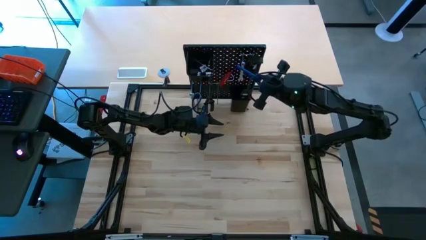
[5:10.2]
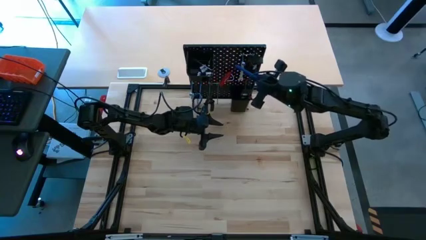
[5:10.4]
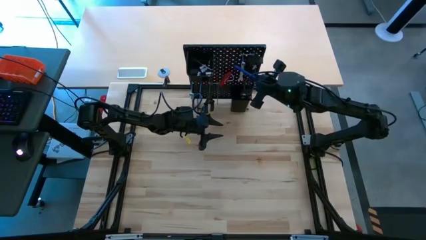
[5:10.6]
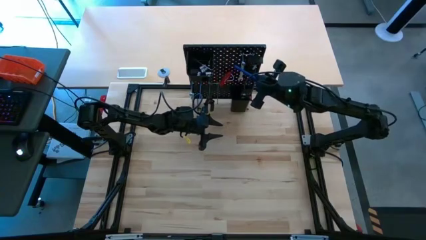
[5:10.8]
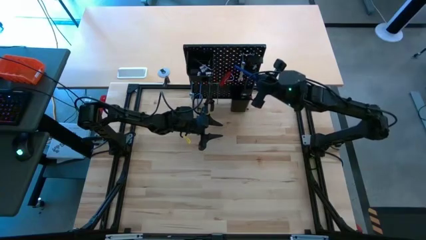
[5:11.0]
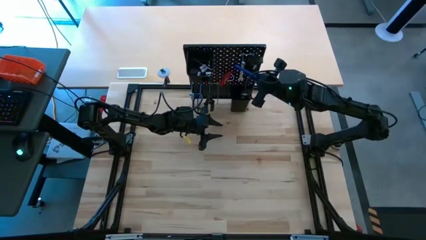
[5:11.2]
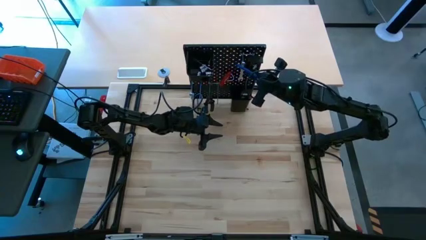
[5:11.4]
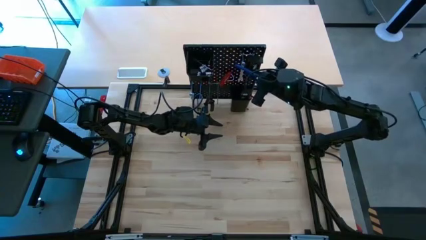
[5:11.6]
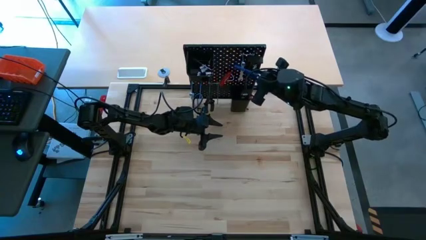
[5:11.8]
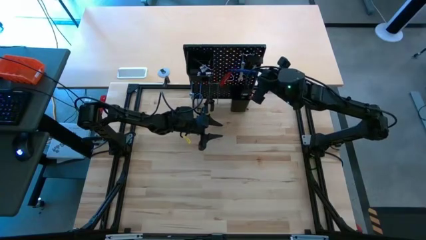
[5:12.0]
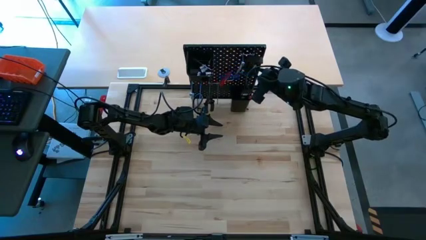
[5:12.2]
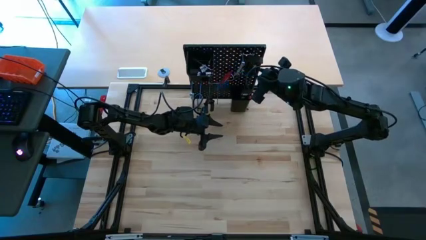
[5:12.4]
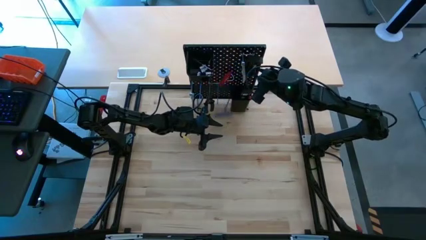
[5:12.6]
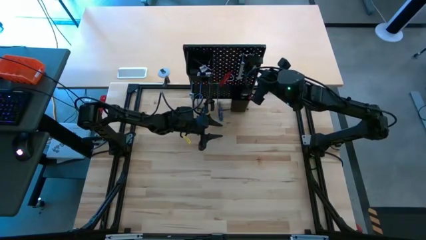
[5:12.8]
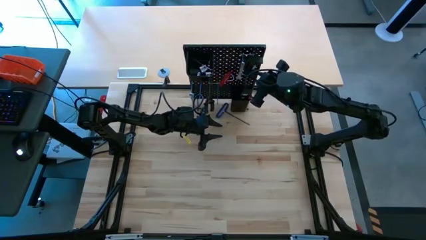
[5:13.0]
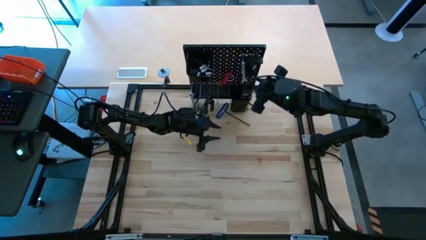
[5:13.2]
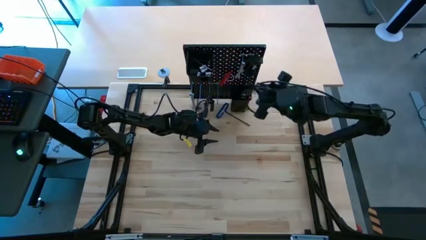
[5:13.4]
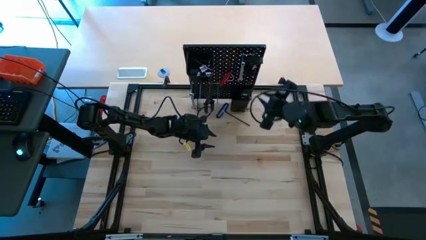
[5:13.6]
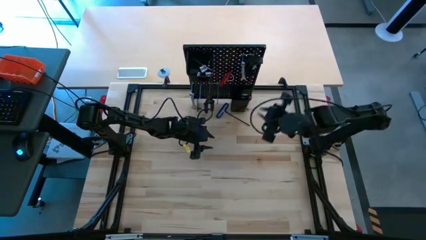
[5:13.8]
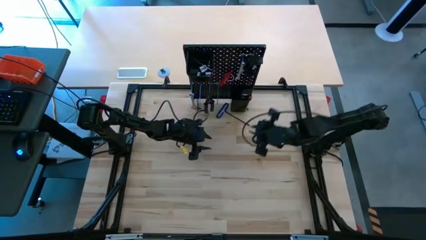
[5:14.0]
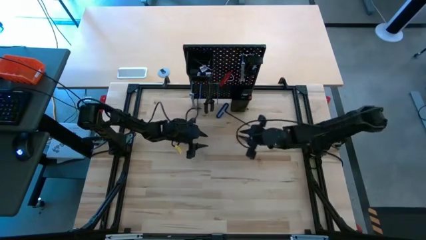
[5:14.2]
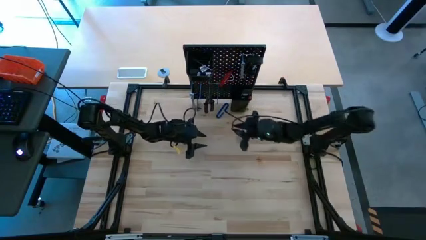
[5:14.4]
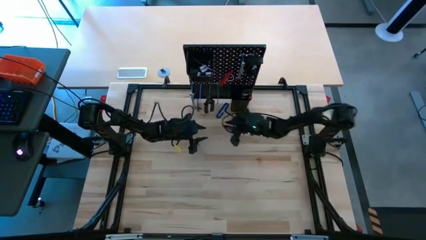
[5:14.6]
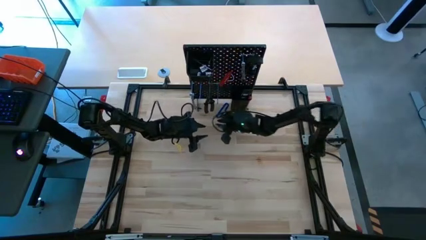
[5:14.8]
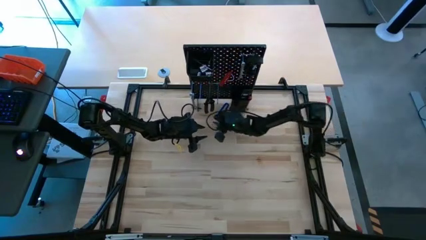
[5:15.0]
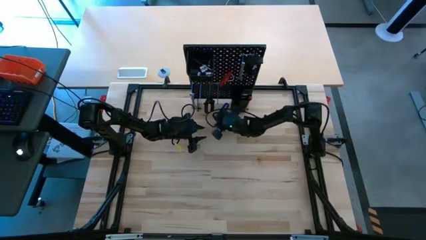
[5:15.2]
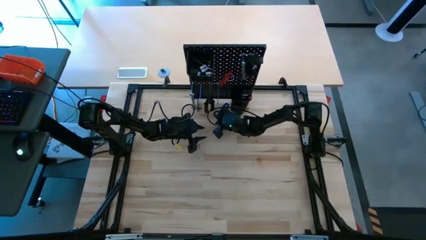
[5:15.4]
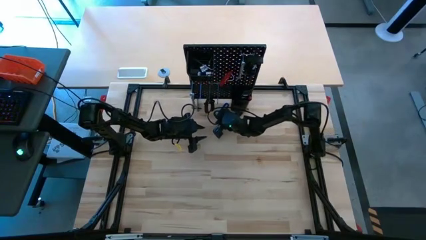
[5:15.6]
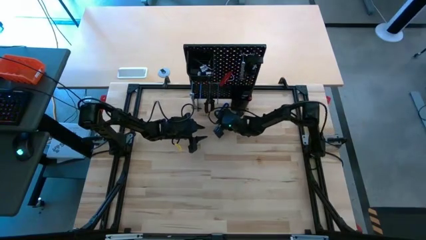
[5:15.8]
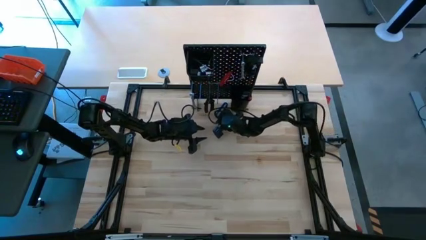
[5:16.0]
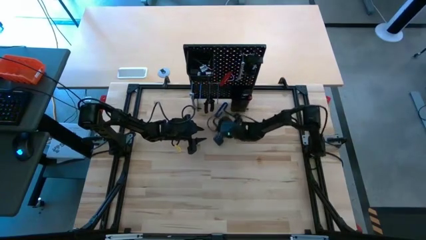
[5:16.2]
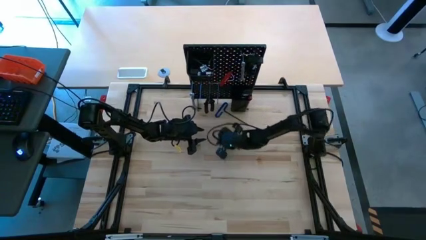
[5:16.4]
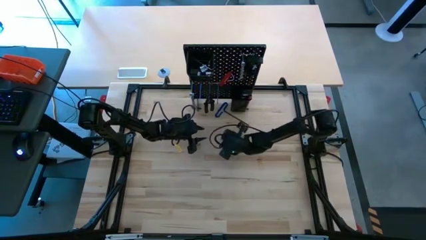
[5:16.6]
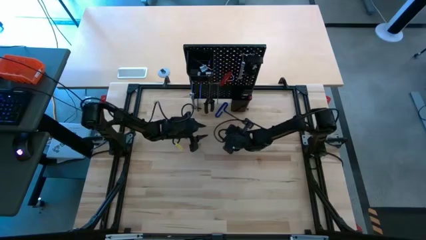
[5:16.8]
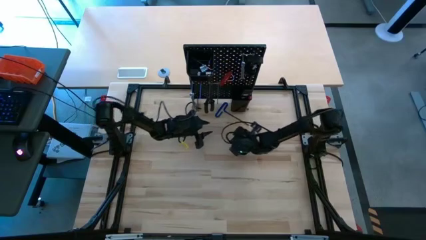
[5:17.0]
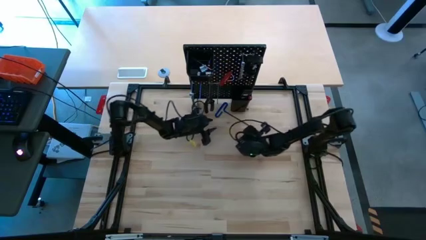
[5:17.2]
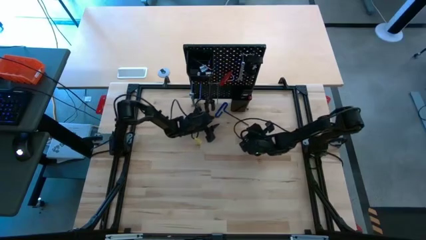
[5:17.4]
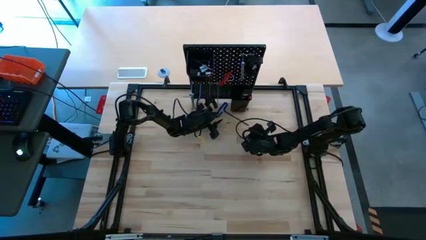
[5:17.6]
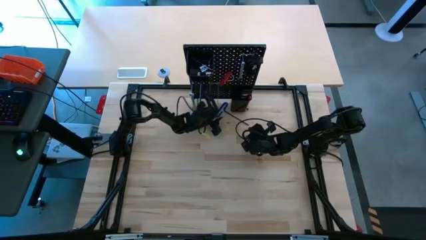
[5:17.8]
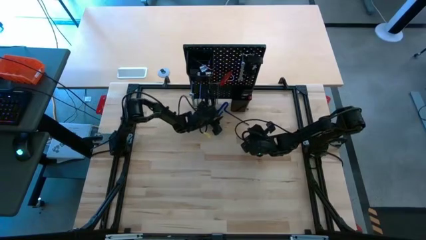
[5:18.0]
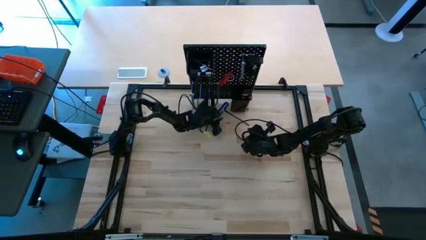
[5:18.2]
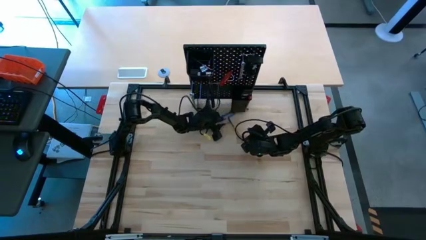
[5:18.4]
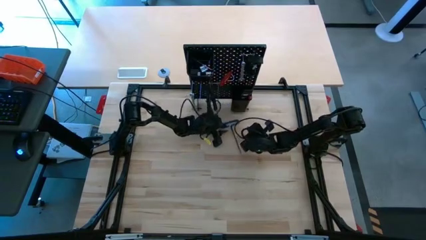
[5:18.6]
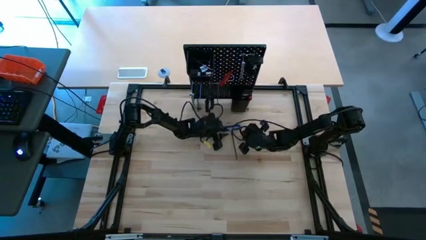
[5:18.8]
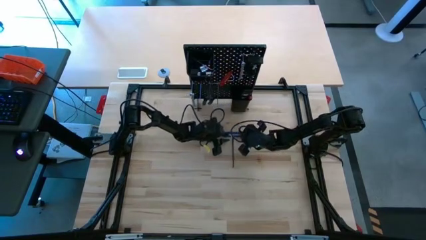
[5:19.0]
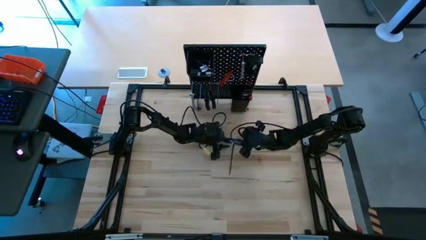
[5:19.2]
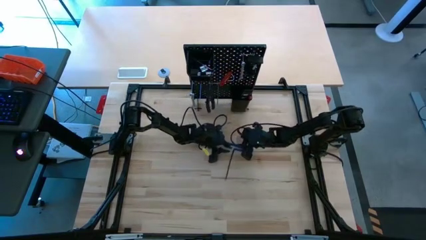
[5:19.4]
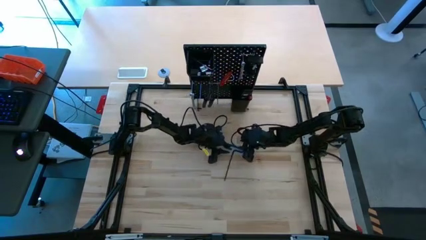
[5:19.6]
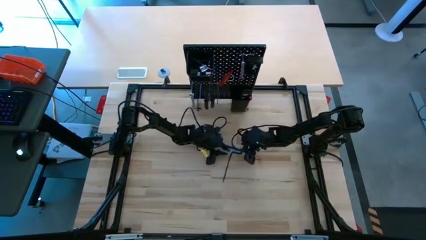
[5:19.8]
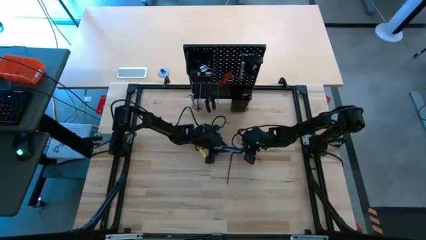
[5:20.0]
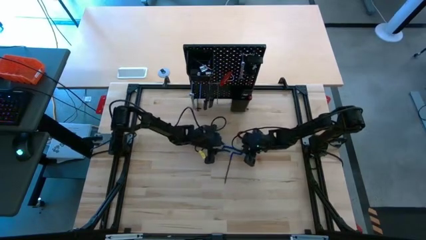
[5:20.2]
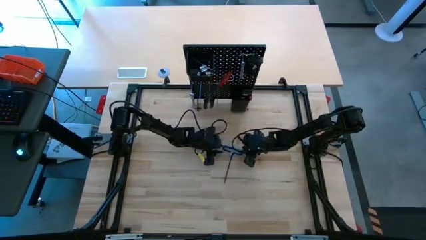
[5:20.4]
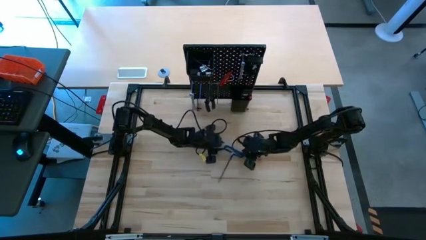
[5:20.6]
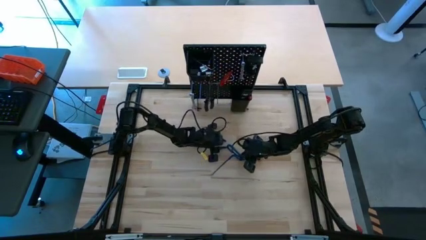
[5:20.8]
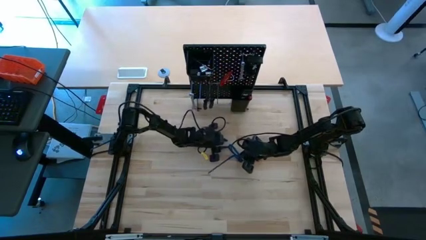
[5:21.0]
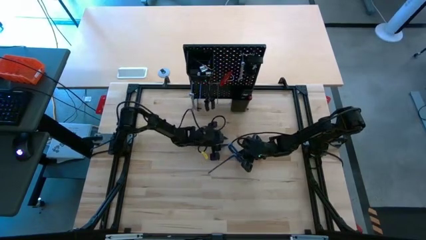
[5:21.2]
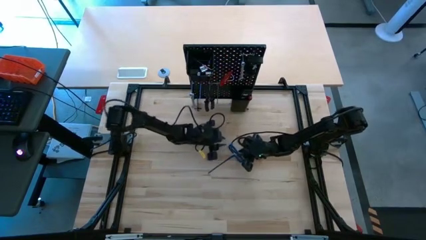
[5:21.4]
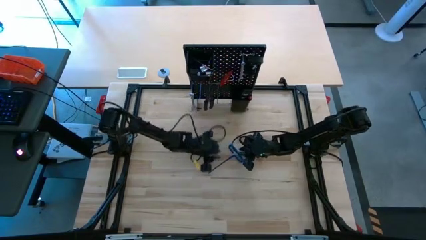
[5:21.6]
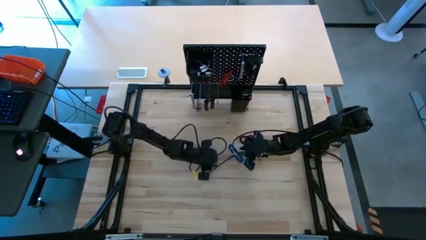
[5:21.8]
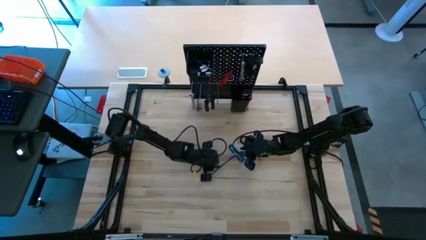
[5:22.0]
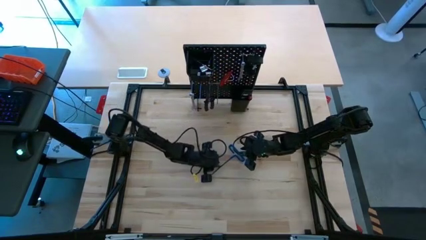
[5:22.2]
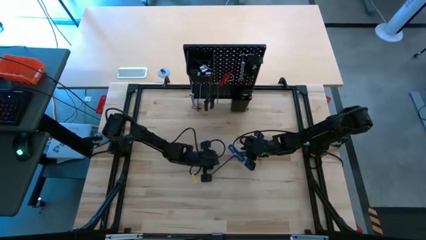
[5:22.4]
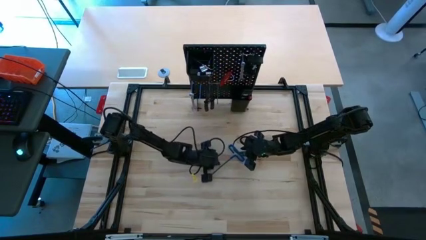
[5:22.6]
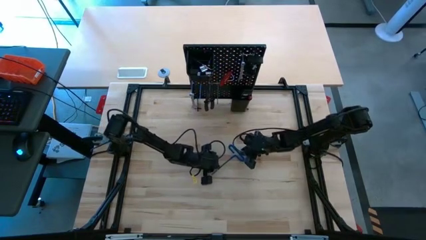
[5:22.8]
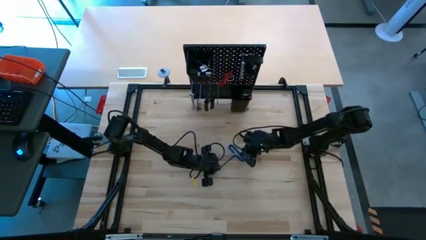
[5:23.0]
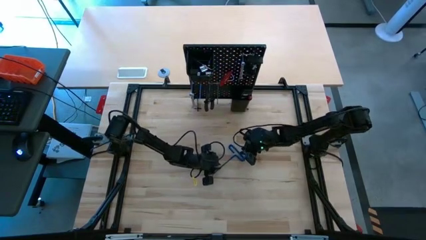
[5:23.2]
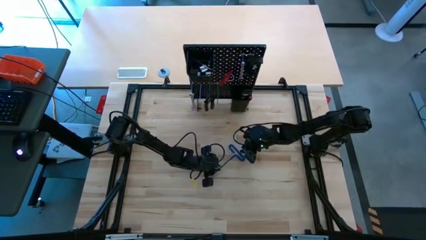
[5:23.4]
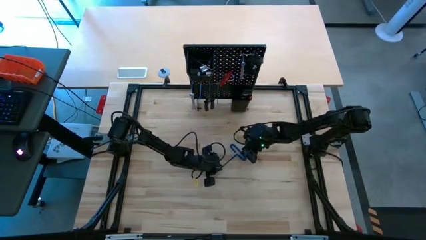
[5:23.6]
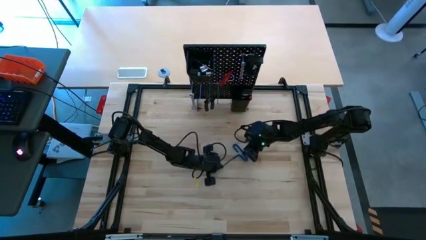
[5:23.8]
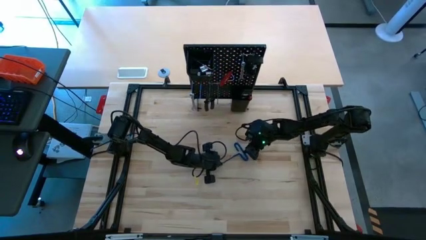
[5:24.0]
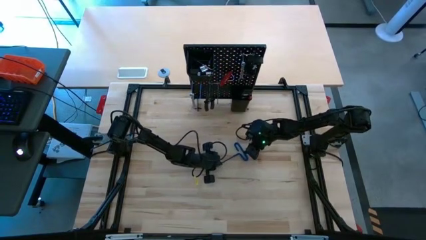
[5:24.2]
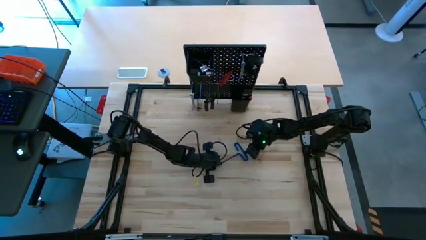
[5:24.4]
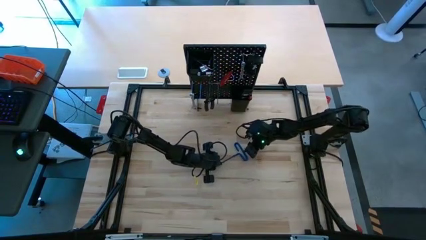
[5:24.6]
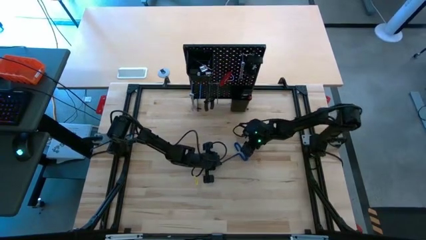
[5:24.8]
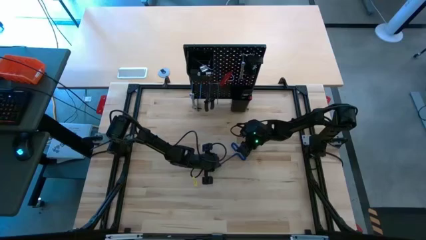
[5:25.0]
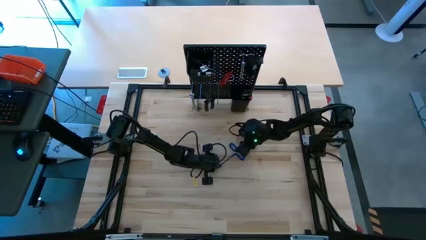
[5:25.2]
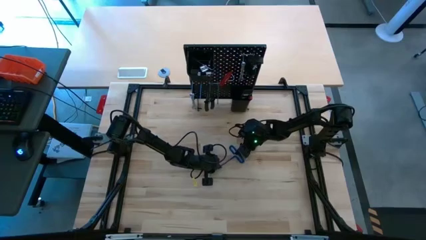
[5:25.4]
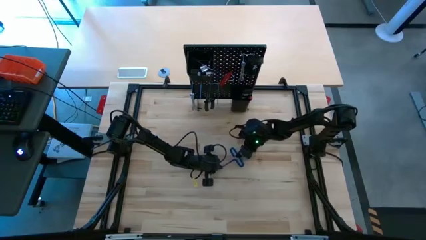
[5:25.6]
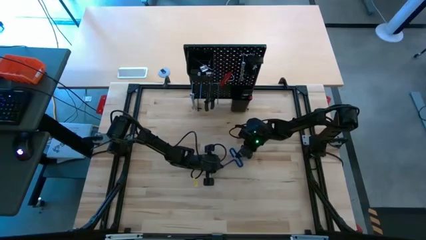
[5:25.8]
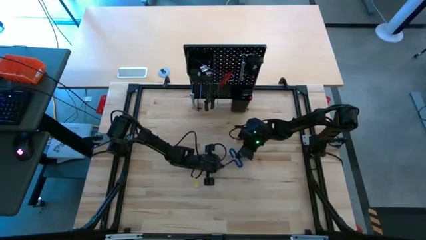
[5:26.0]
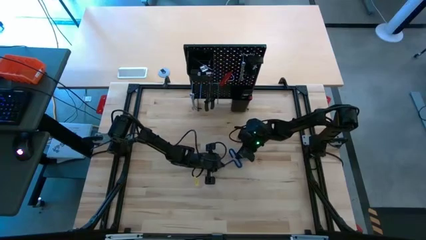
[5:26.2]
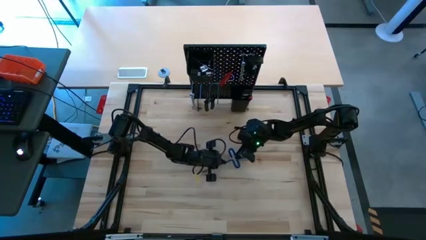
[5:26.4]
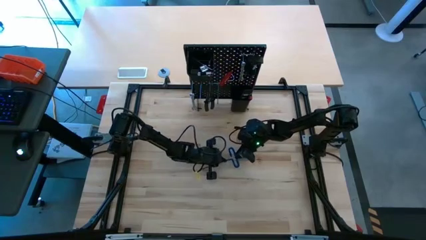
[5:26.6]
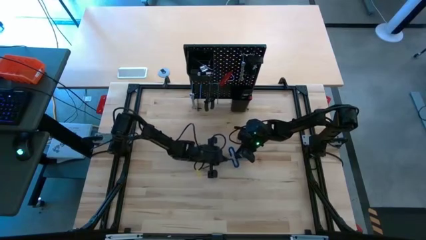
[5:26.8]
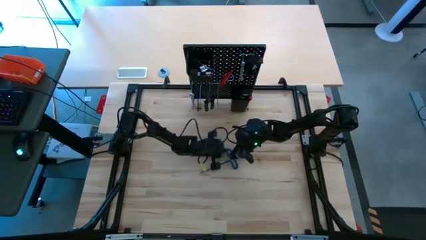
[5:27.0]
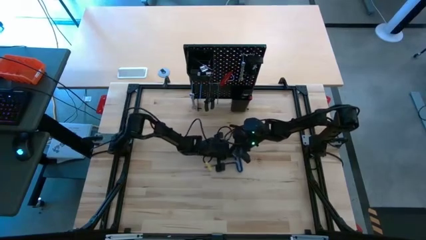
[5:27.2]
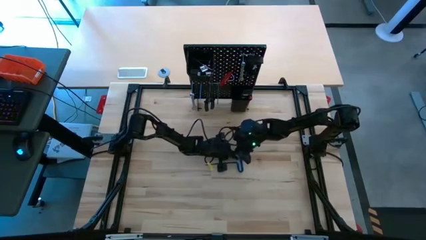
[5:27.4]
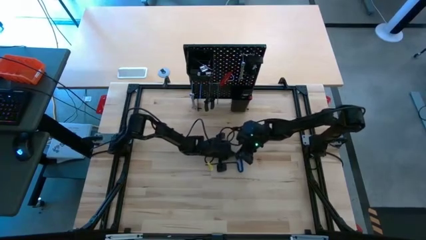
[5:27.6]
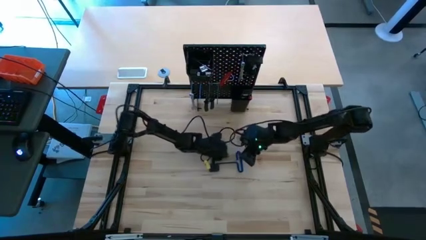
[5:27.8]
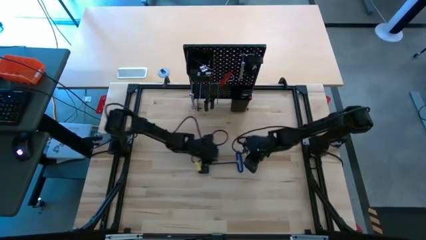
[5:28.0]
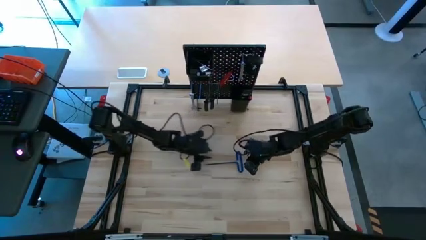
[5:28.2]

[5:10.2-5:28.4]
Task: Hang tools onto peg board
Put the pick tool into the bin on the pegboard
